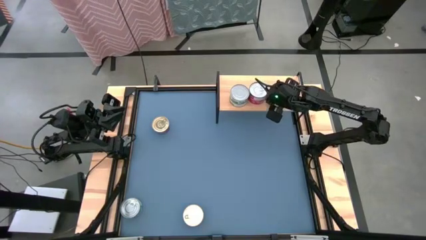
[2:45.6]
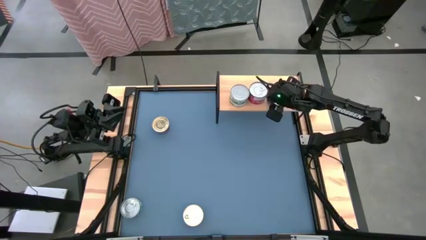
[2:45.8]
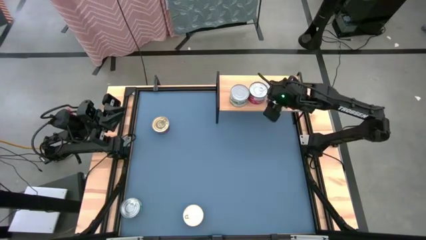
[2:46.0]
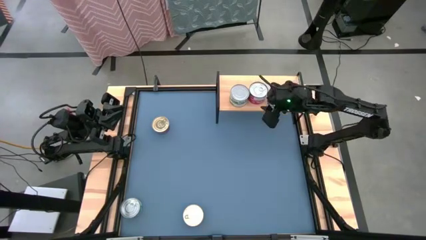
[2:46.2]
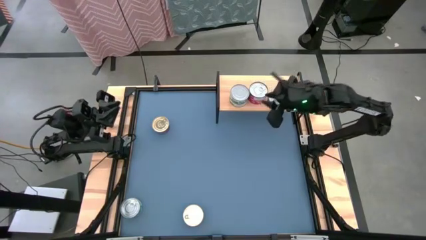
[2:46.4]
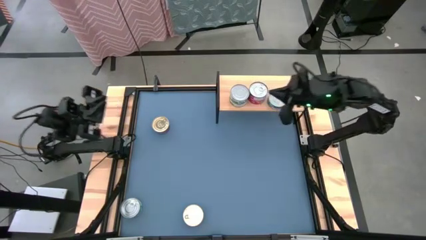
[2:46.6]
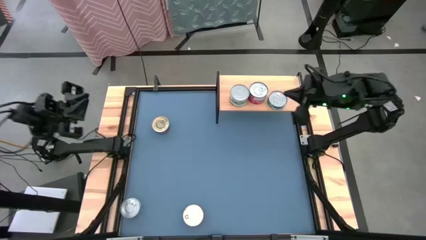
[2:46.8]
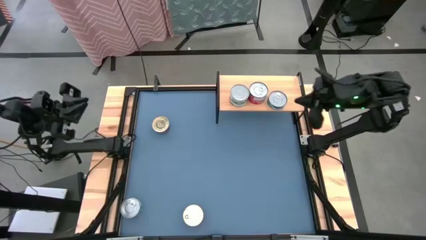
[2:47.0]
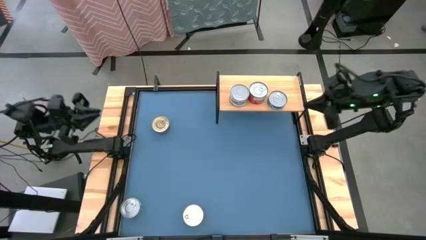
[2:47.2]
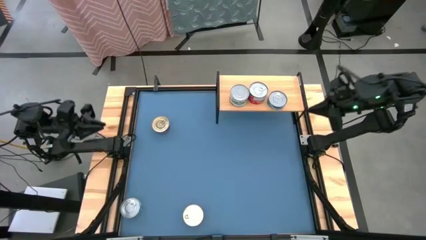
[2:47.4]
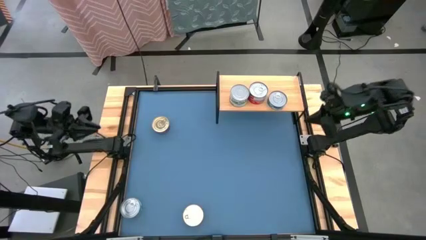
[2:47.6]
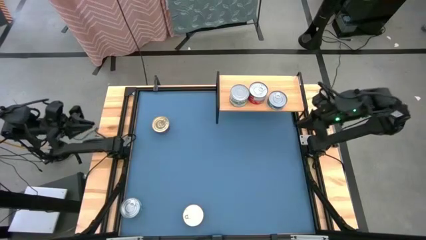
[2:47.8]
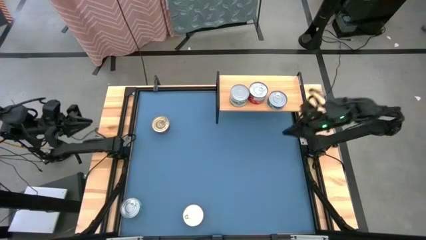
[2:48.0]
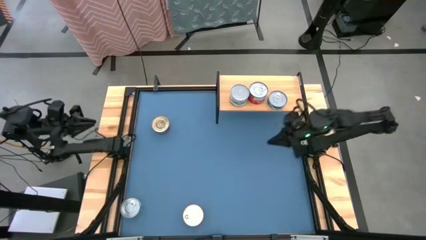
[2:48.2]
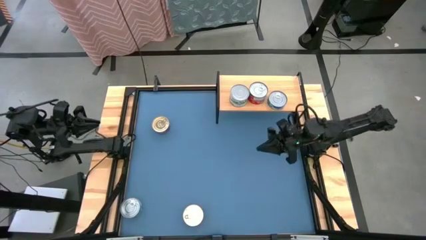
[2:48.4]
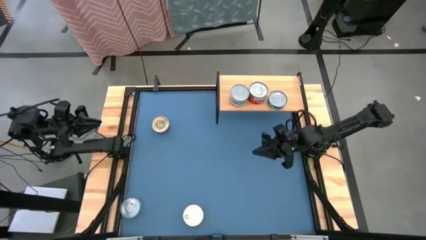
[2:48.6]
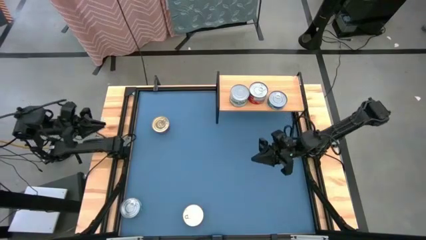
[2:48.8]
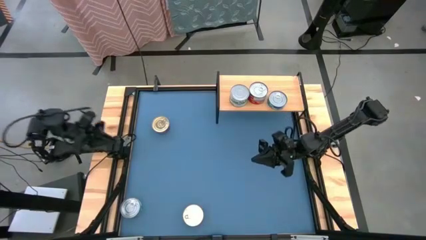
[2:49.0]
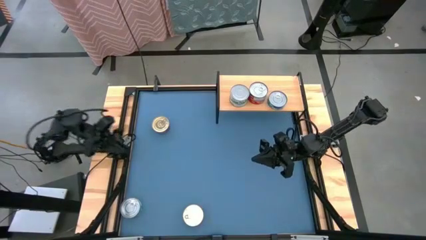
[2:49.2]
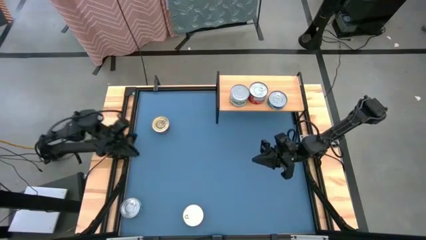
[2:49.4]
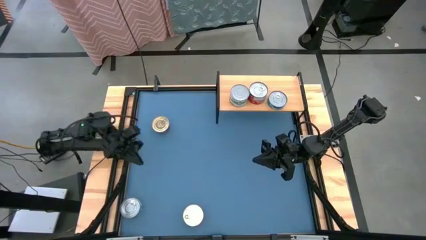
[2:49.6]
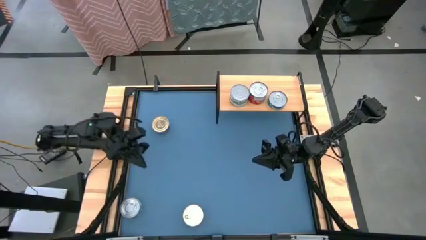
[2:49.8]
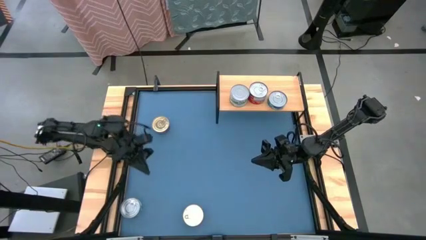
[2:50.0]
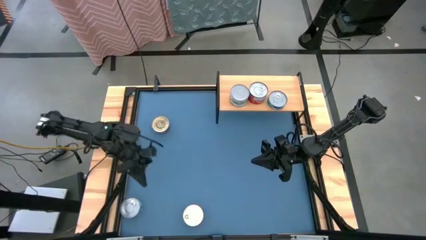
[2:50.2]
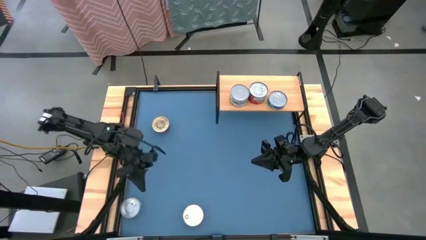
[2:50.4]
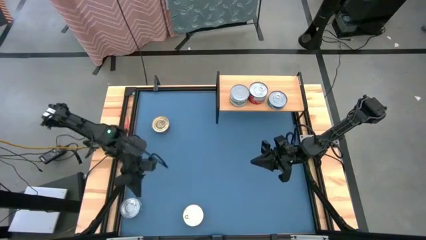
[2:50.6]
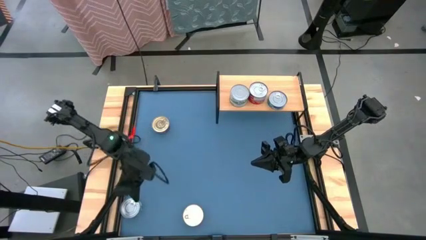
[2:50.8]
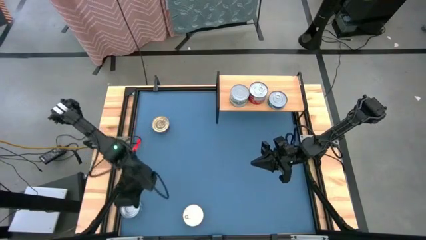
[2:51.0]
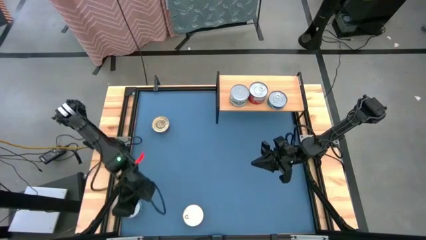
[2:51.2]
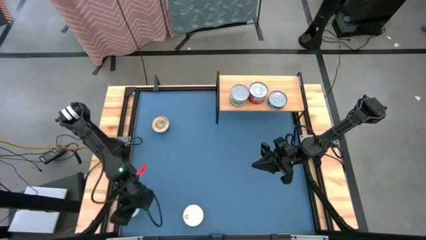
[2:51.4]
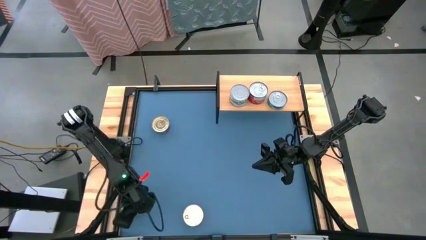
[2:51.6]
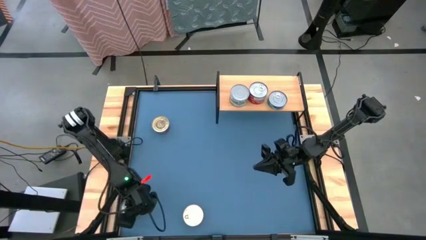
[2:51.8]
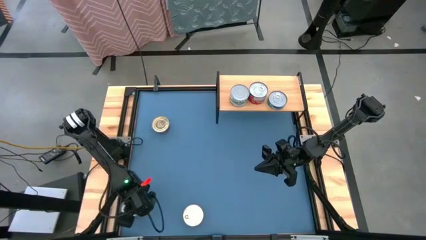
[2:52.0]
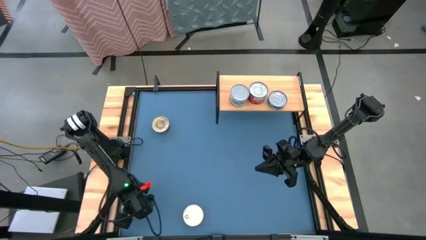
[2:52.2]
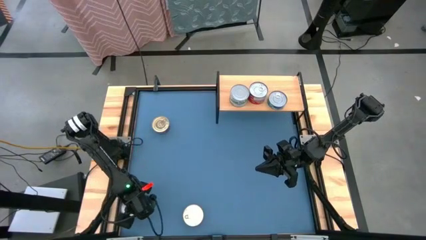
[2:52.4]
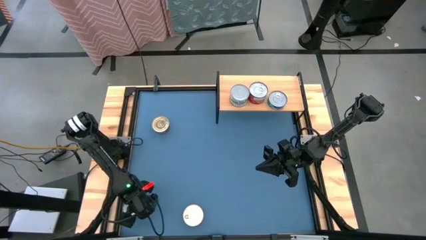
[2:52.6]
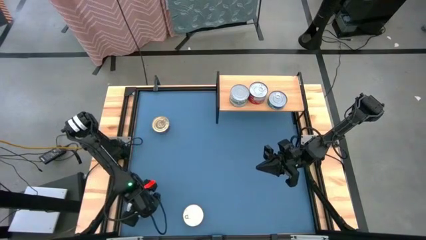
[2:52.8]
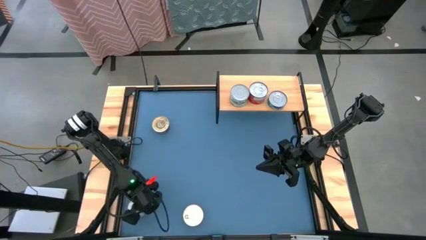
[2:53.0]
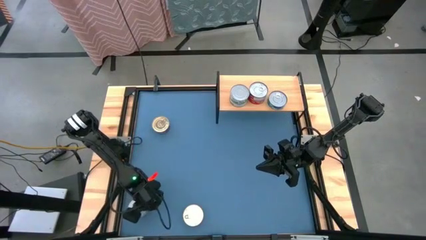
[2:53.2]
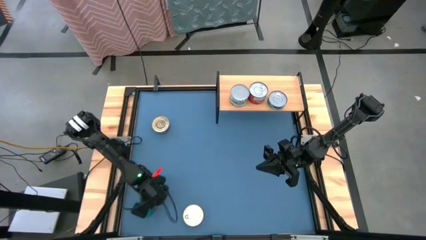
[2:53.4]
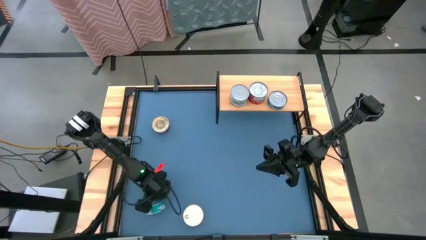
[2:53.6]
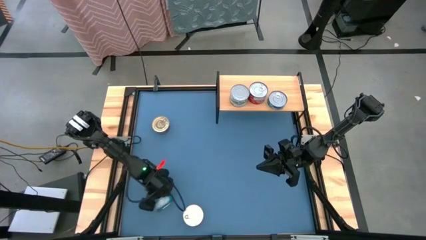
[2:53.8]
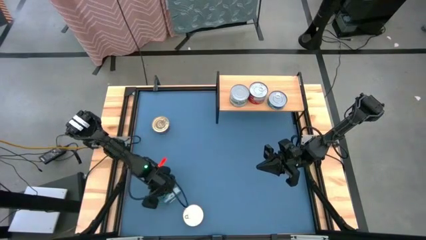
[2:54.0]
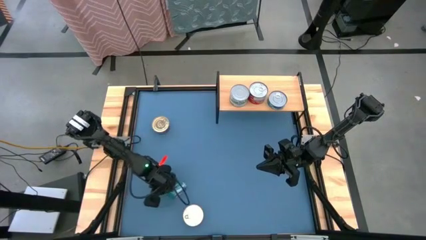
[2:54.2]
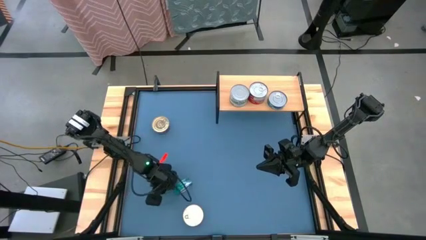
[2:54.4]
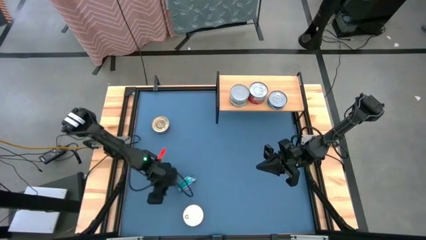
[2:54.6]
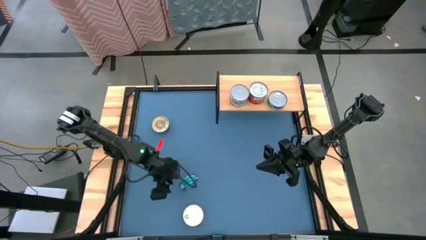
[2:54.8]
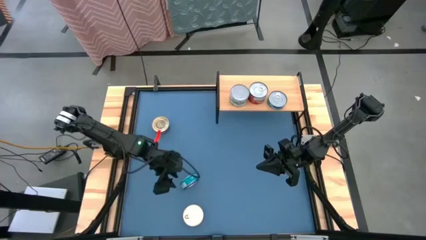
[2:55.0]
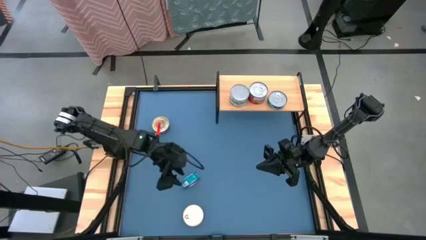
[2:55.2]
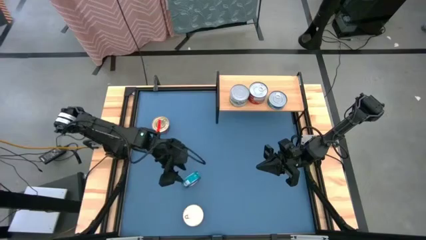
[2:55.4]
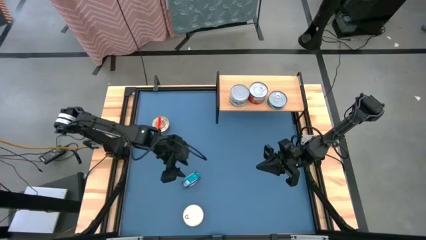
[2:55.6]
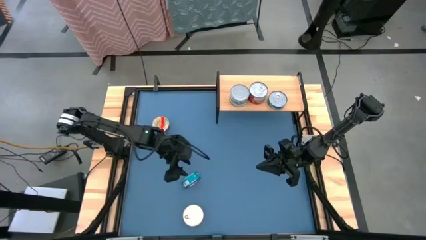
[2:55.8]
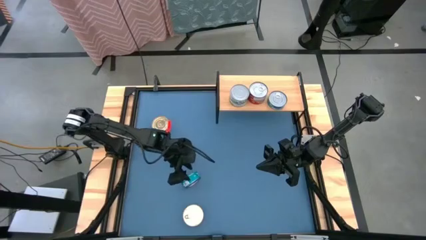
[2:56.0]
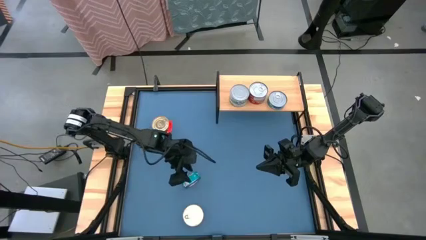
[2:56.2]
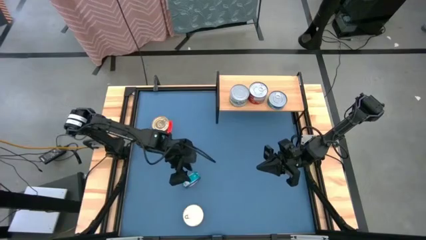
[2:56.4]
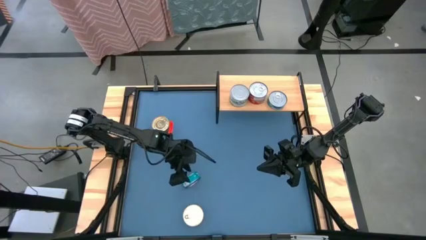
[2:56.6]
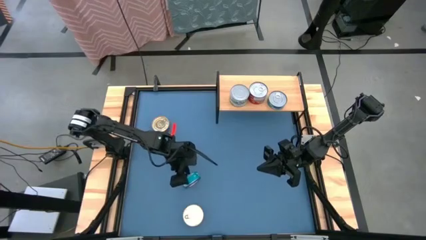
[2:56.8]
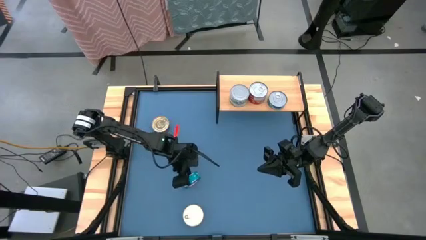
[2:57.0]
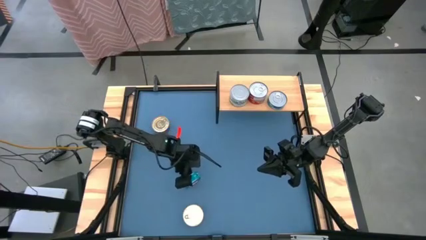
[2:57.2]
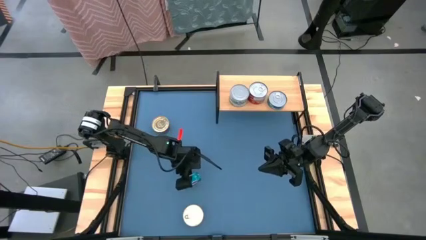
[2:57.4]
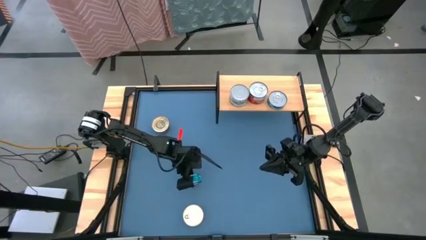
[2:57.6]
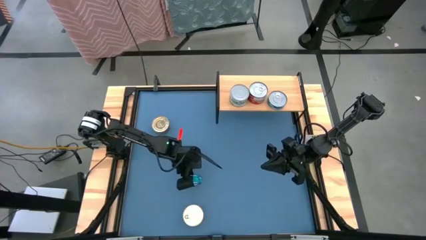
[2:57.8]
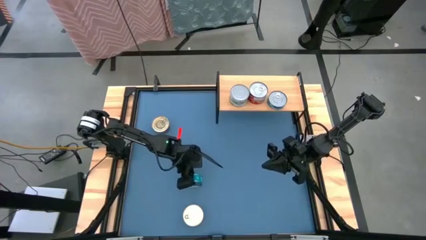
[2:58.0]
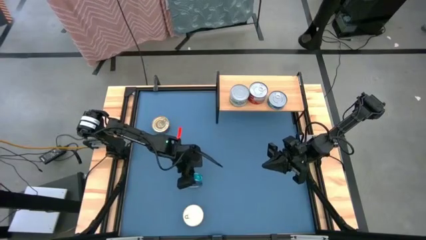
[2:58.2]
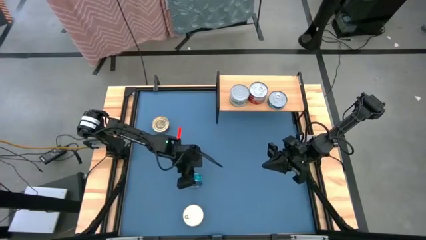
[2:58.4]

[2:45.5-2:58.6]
Task: Stack canned seafood by type on shelf
Stack the green-blue tuna can on top of the tuna can on the shelf

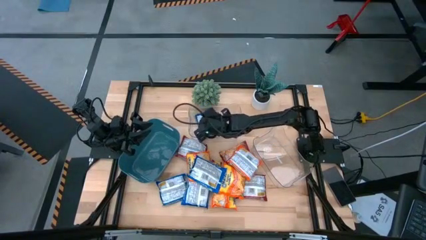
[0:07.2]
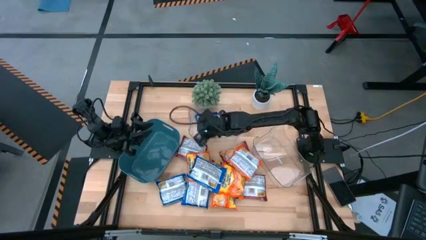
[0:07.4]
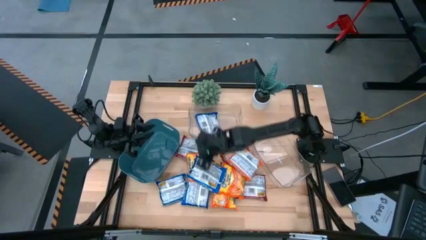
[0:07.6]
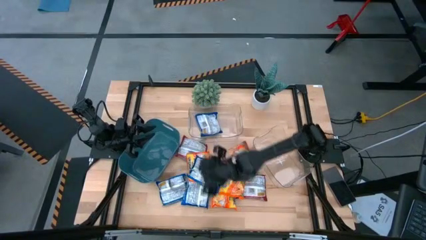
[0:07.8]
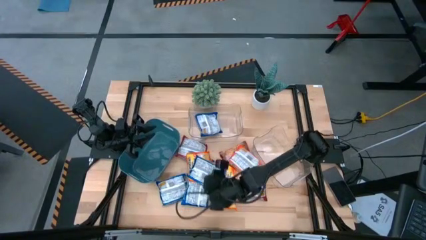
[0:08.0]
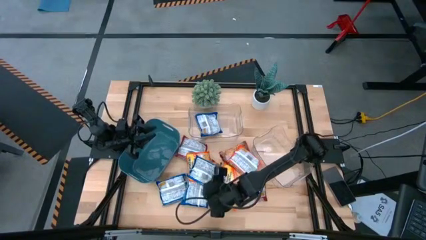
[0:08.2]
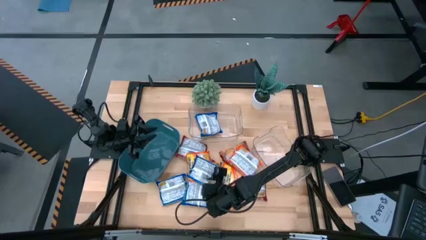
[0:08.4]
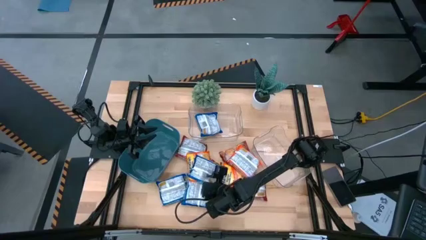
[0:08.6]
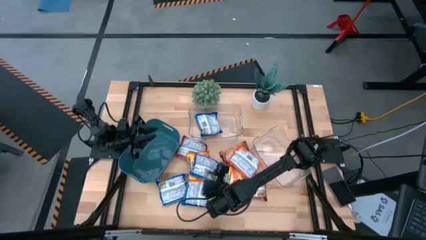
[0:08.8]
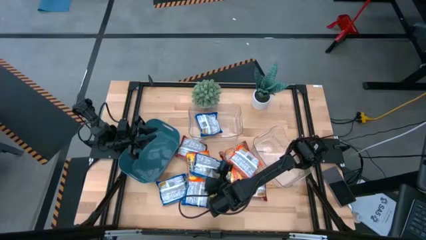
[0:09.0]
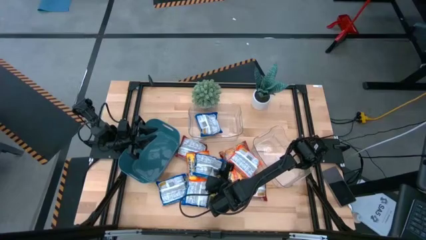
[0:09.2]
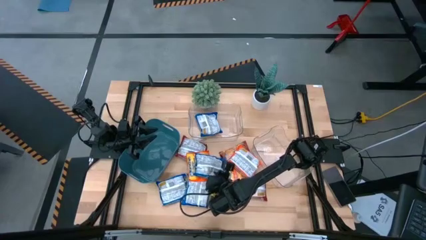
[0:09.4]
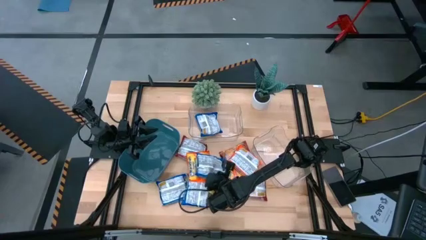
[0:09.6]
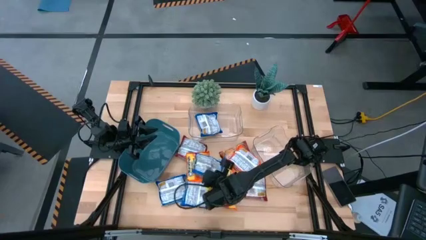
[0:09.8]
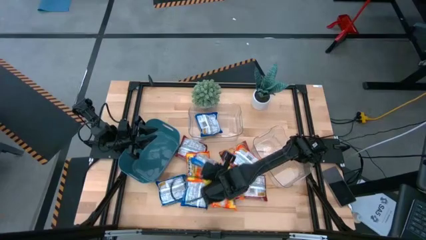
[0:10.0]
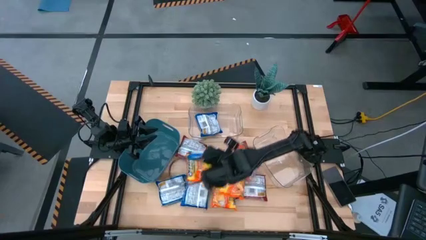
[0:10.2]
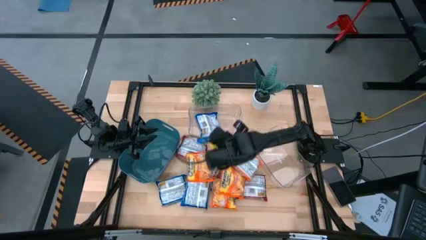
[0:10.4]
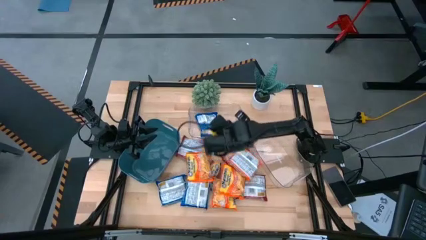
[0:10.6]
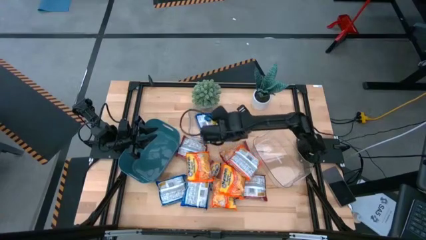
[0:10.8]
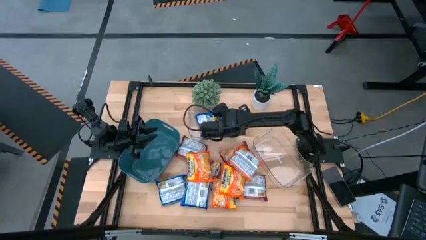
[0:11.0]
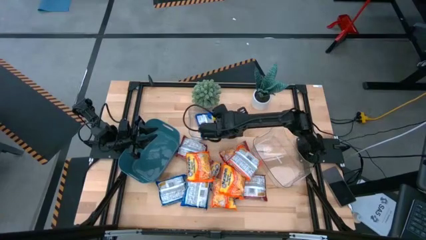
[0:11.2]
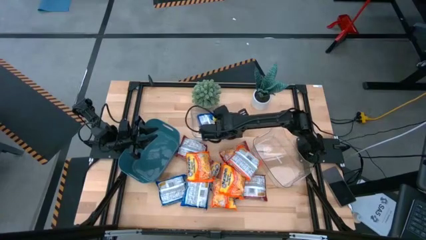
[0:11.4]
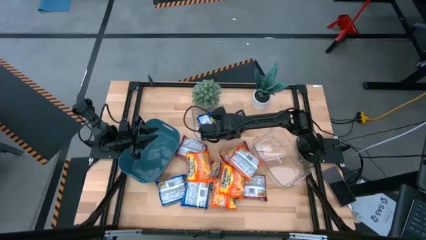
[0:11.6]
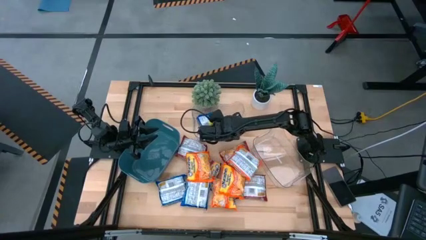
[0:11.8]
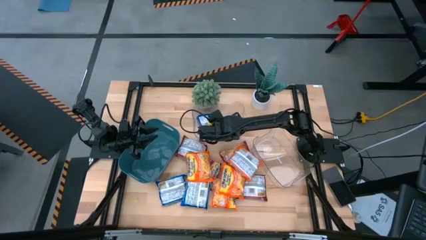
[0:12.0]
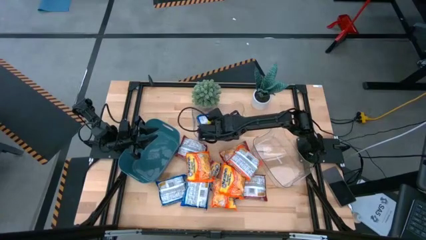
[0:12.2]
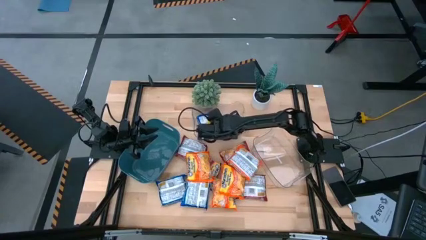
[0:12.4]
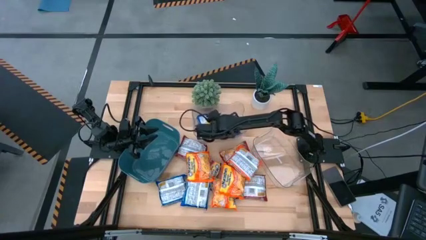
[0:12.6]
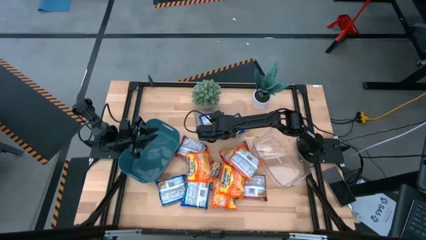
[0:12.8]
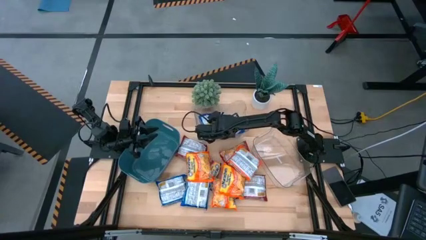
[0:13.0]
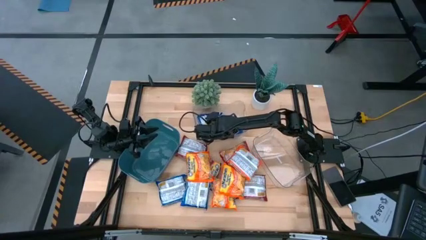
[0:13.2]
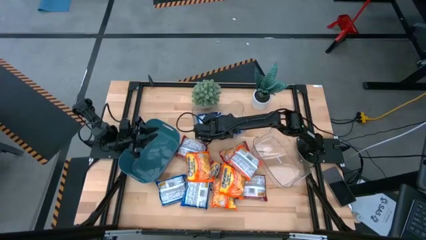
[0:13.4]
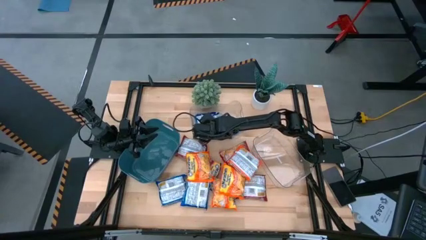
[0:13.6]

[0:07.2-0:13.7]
Task: Sort Maruchan noodles
Put the top blue noodle pack into the left transparent bin
